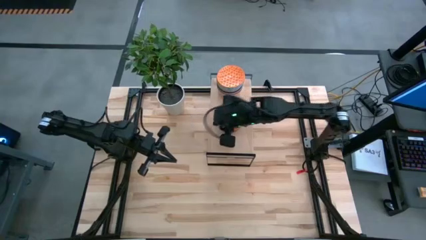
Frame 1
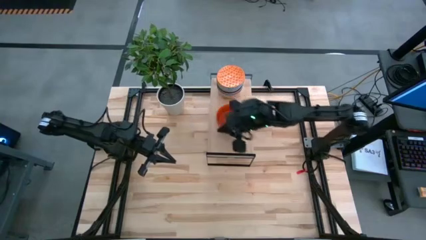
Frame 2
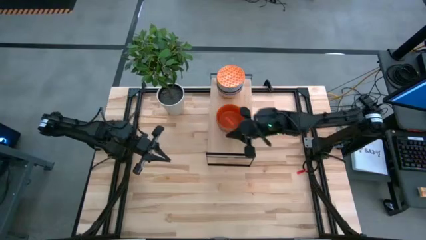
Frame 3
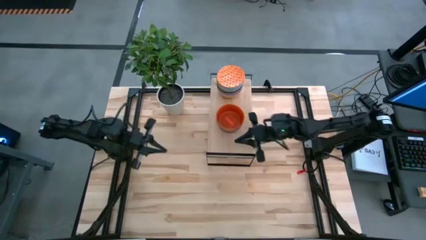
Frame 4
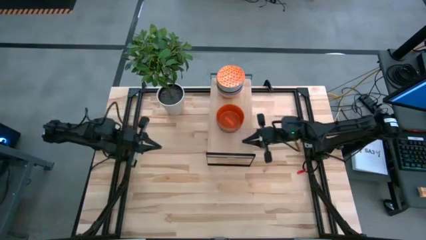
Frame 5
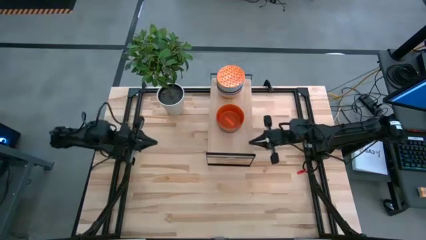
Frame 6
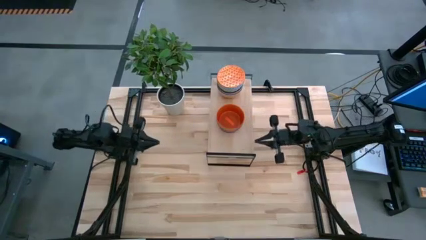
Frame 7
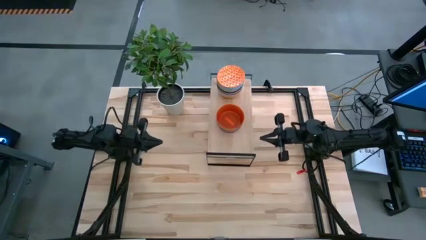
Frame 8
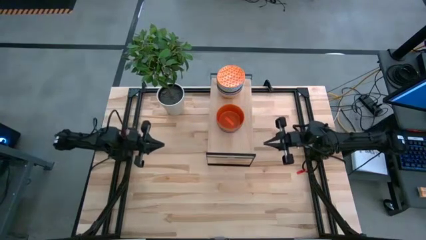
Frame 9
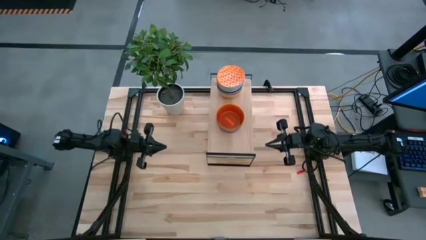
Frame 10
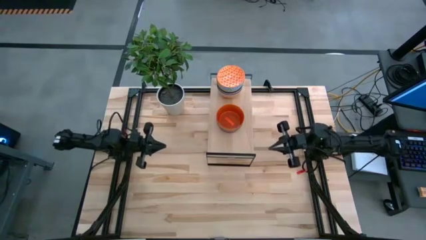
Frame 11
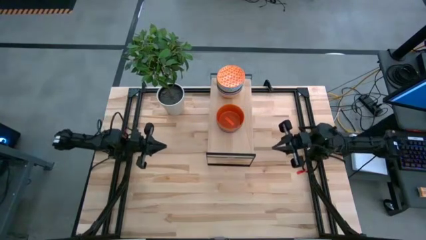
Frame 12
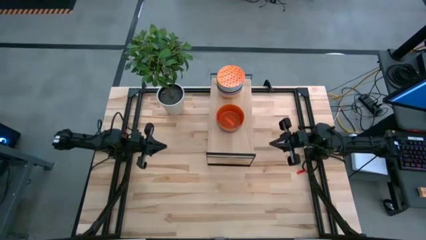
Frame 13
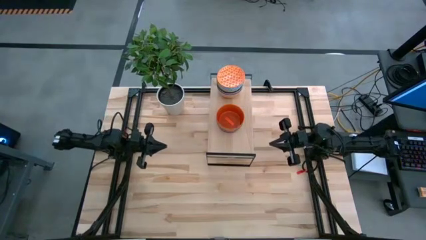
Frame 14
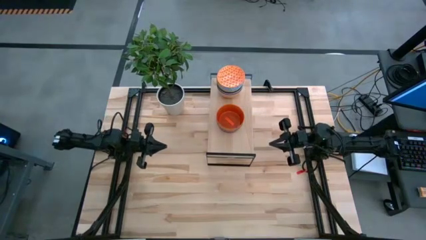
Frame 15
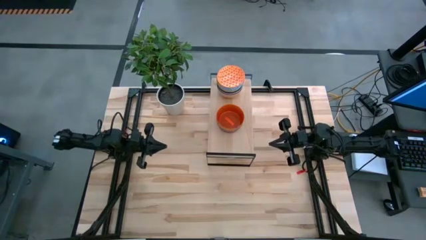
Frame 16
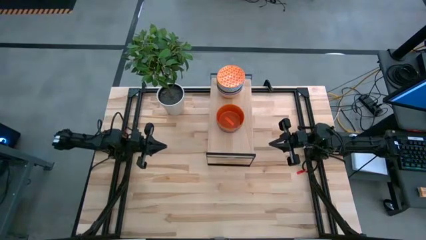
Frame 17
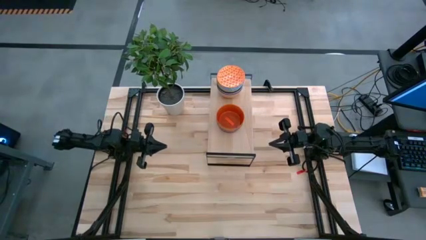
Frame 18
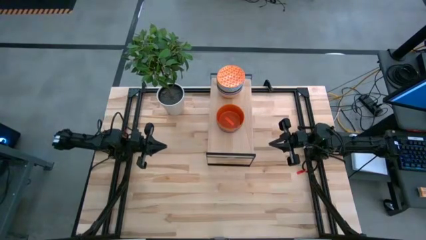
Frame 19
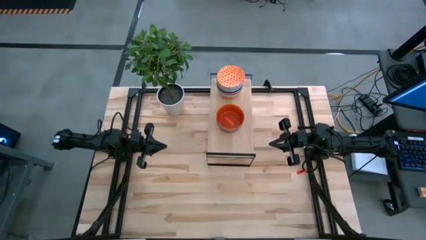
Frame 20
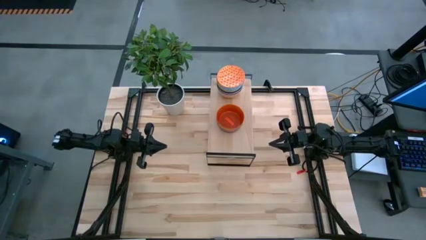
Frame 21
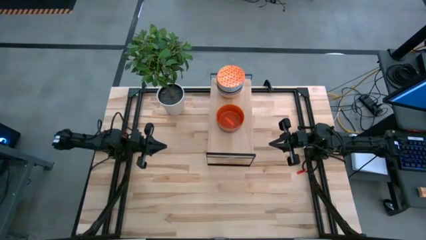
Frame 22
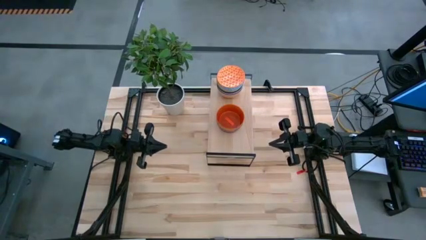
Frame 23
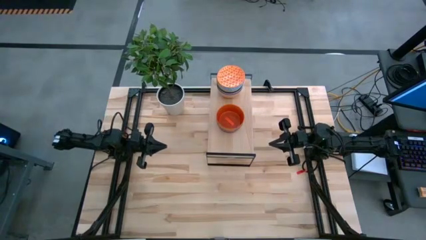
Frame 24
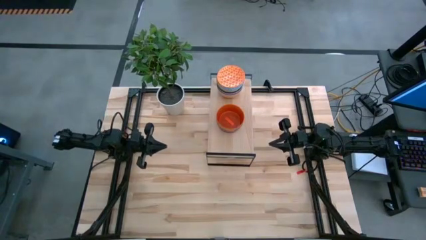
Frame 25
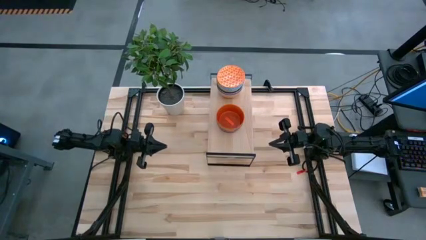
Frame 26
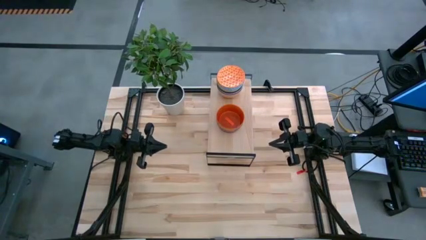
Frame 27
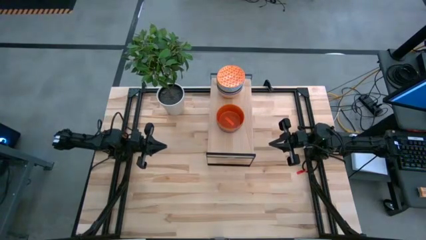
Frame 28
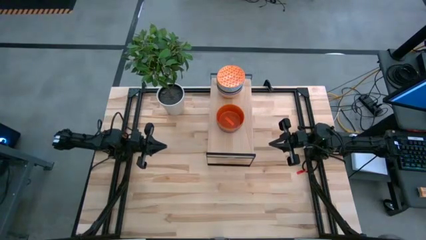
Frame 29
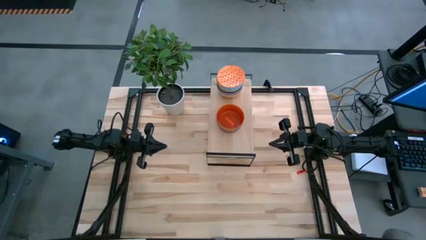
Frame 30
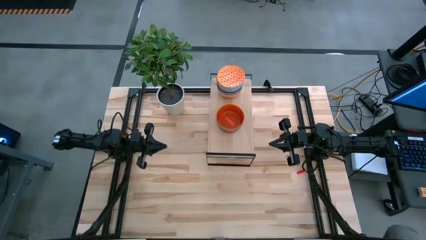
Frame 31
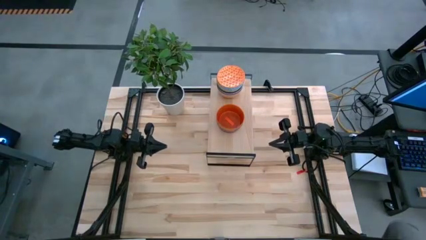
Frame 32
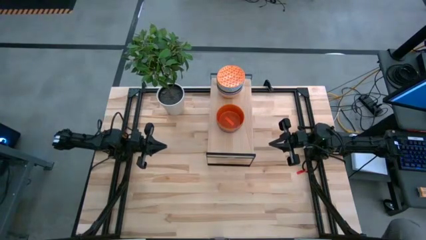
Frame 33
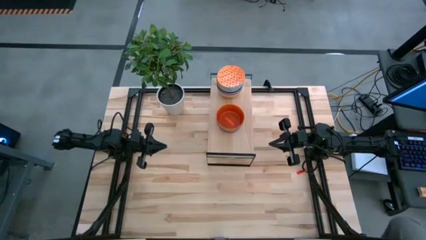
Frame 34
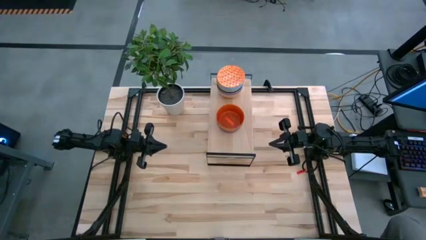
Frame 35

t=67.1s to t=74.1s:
Task: Place and stack bowls onto a shelf
Return to Home Position

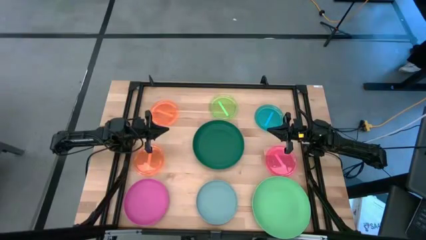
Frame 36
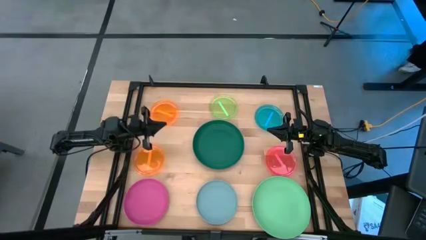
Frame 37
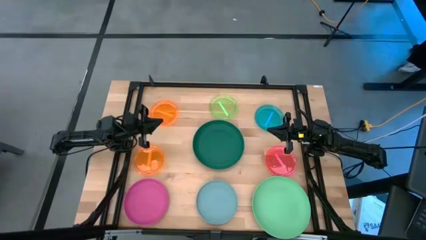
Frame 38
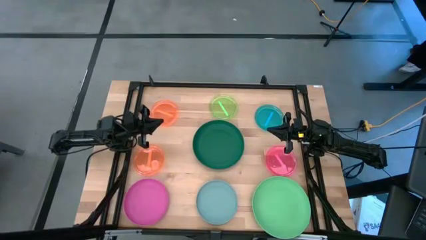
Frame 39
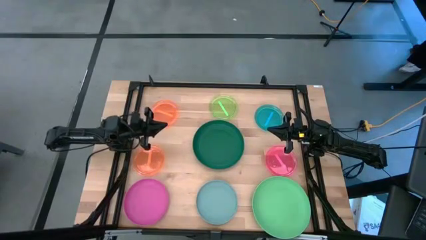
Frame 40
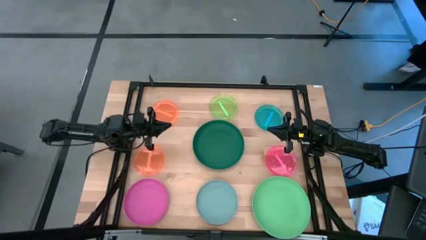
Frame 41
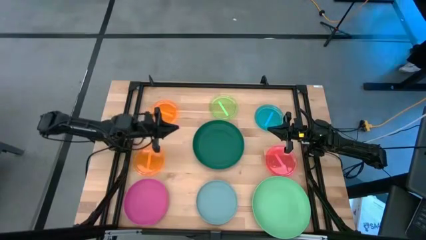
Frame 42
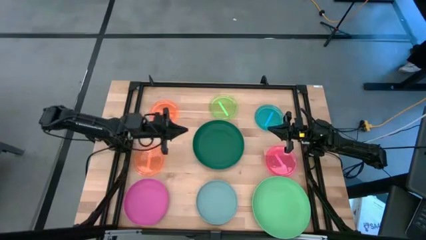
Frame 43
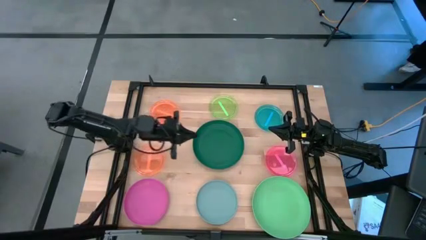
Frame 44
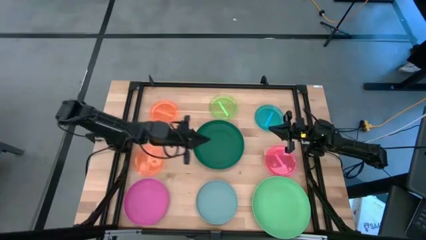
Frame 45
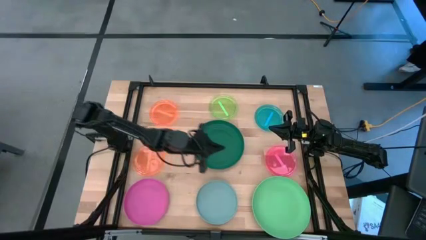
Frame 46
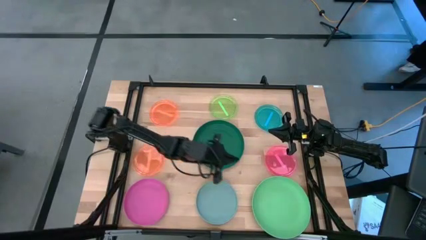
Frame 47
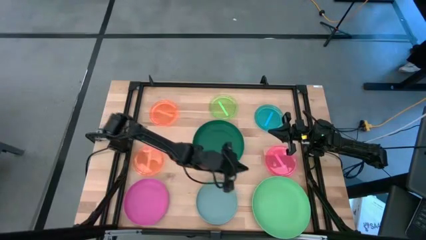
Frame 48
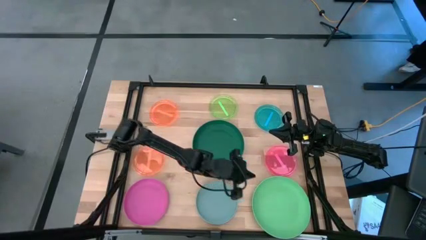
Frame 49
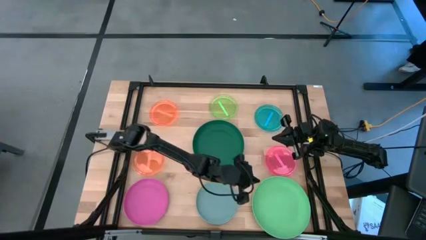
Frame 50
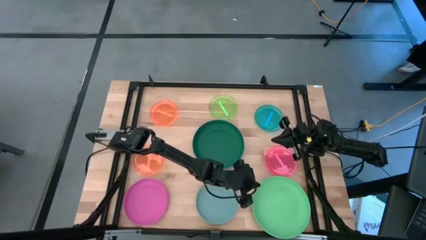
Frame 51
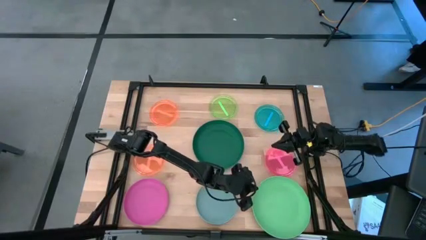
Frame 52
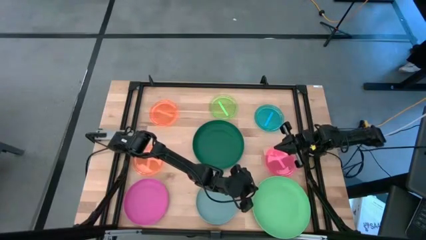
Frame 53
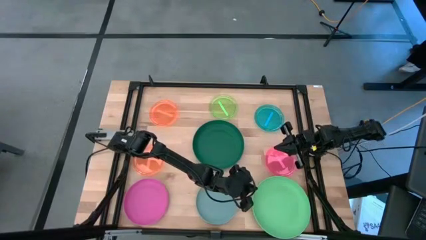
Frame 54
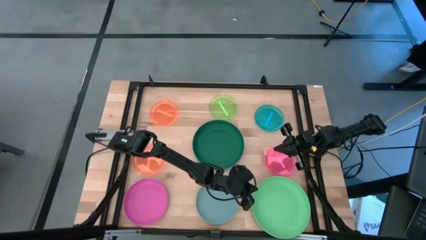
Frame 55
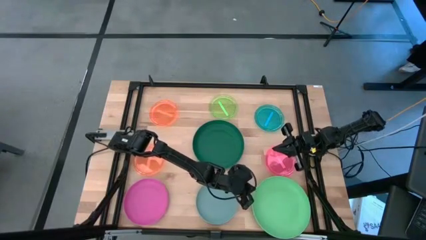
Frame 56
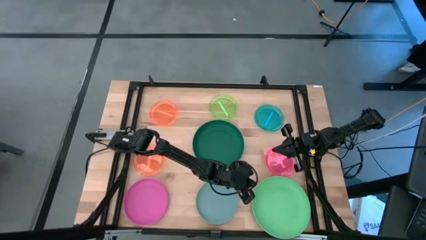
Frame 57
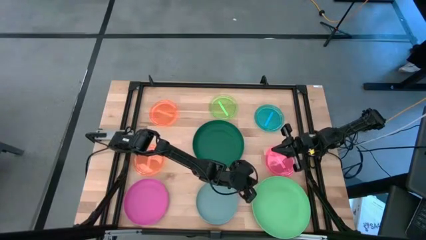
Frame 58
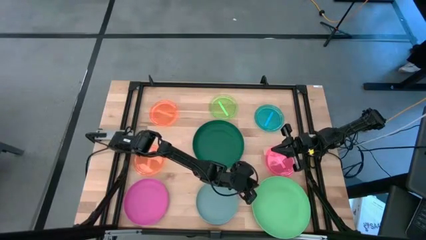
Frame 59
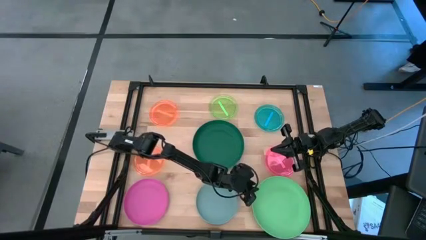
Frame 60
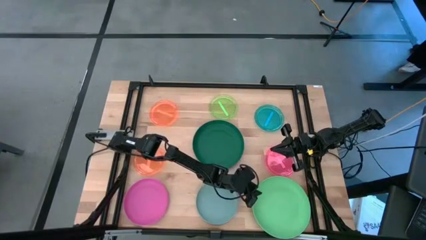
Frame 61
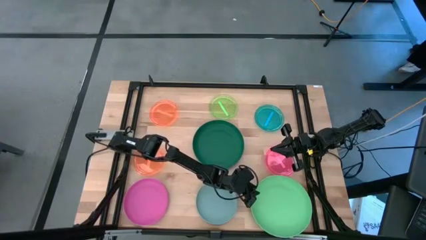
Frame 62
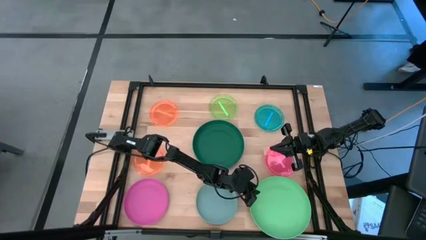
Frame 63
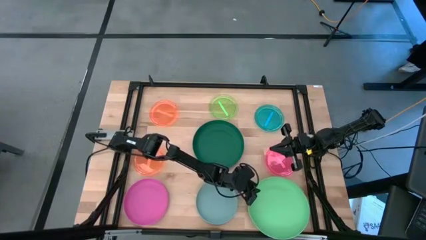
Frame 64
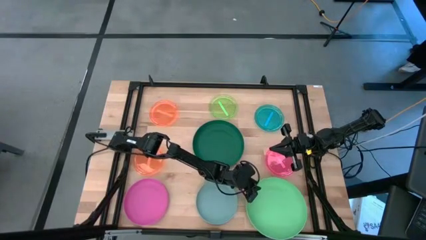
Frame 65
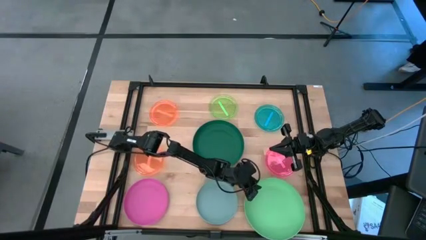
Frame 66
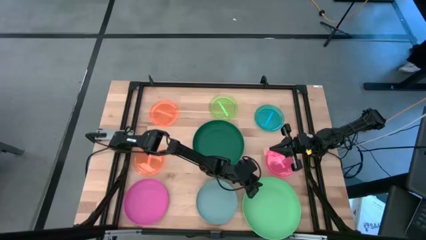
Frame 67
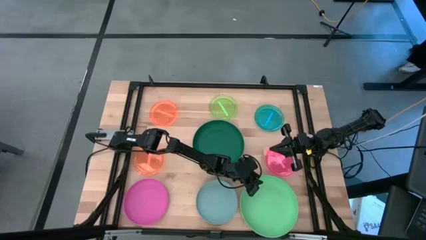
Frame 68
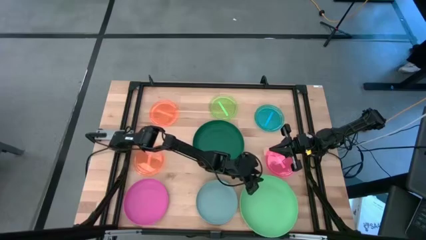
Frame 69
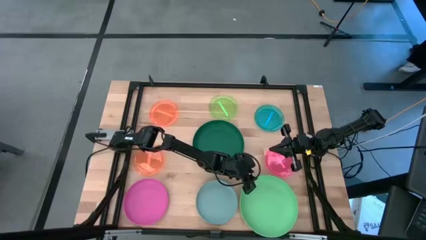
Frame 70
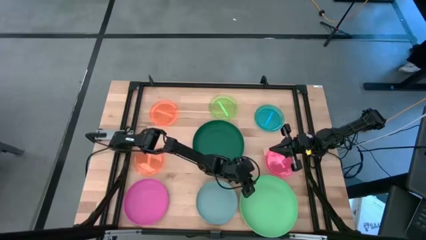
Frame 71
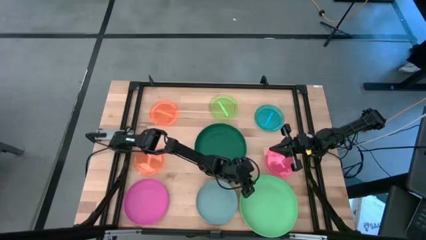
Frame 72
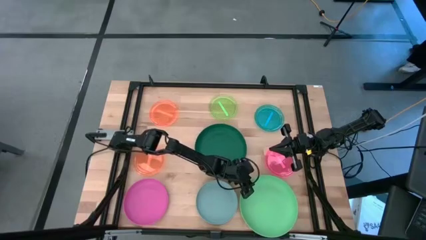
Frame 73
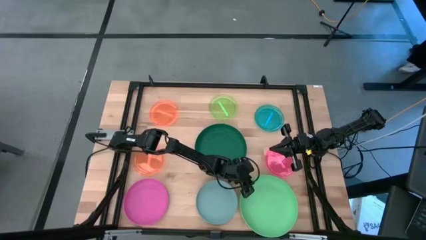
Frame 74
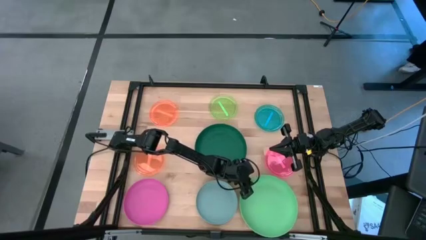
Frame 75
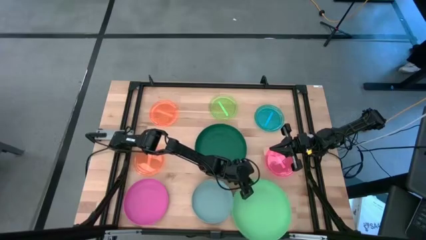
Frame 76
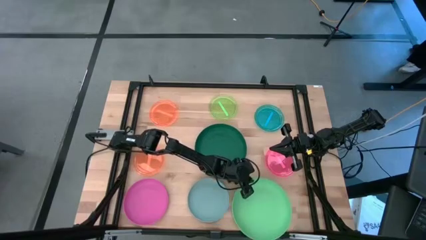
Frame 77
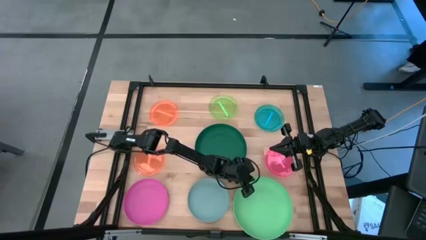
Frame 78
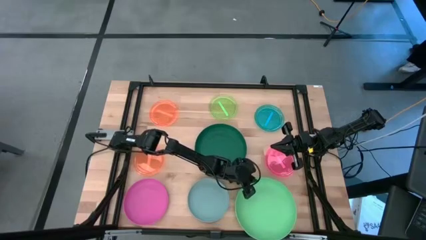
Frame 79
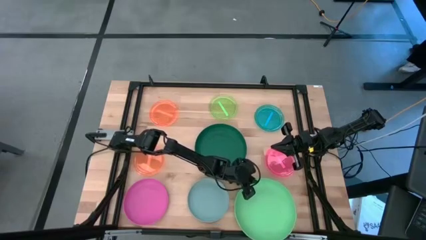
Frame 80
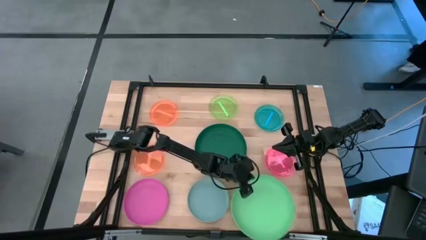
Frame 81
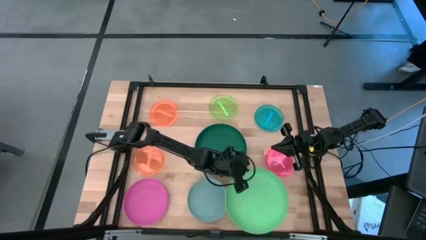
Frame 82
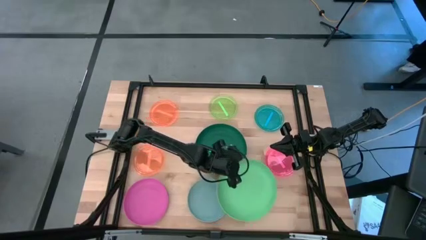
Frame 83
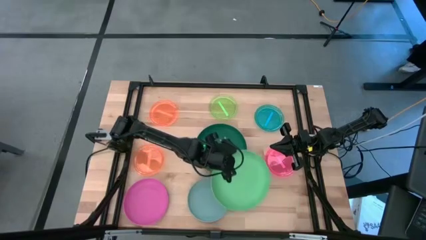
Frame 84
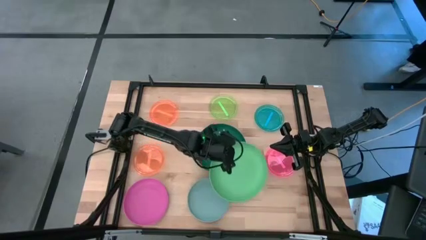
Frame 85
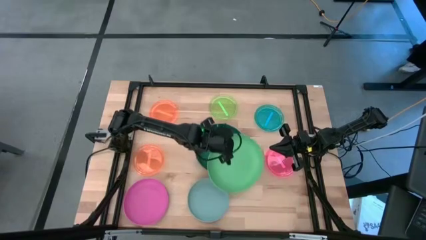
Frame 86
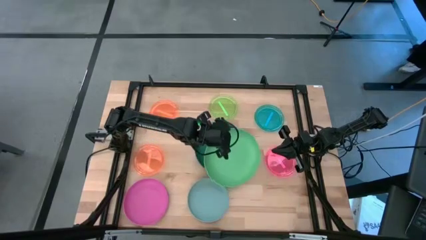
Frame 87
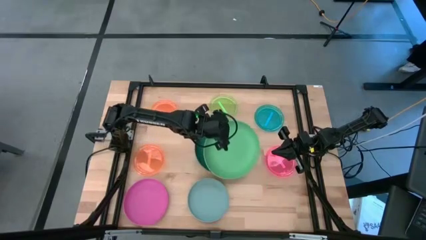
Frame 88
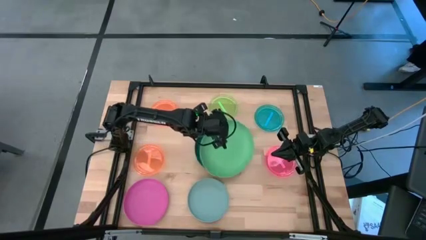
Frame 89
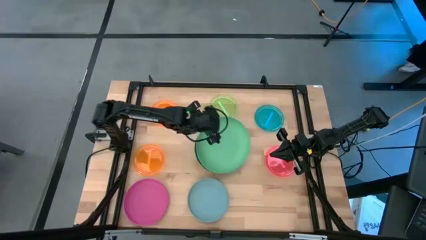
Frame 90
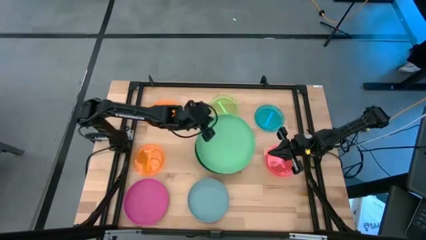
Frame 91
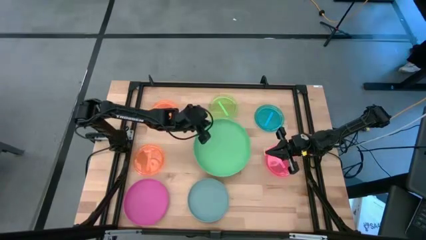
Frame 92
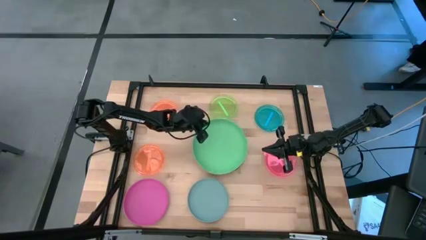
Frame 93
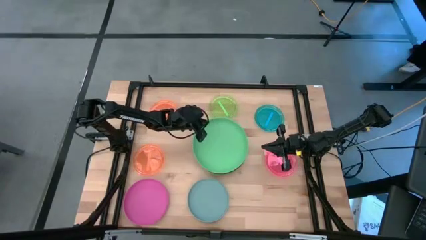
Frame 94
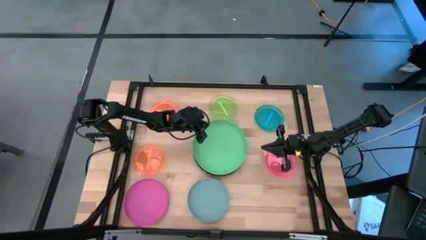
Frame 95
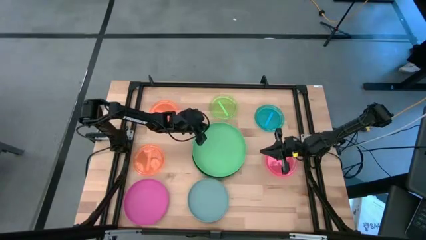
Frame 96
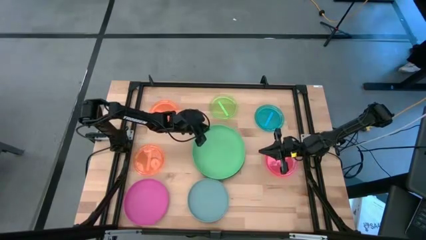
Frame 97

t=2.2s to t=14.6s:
Task: Stack plastic plates
Stack the green plate on top of the dark green plate
